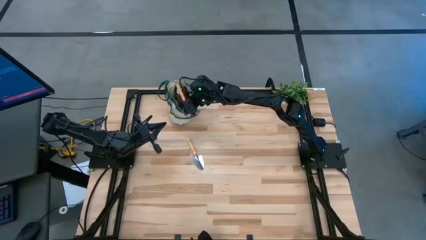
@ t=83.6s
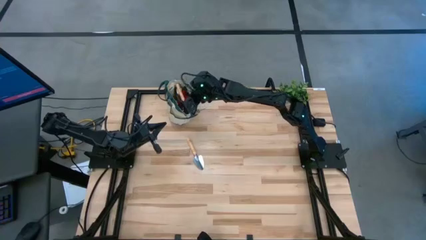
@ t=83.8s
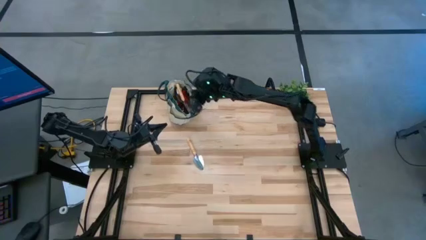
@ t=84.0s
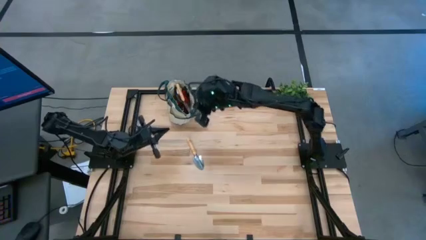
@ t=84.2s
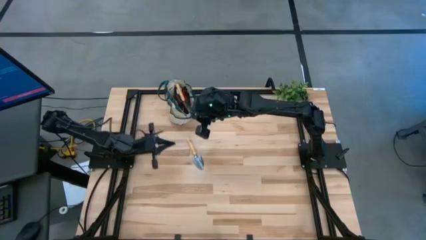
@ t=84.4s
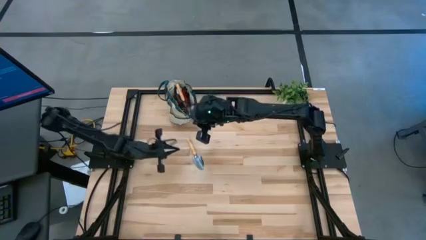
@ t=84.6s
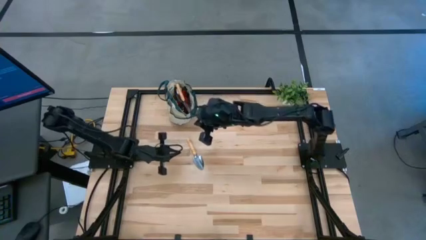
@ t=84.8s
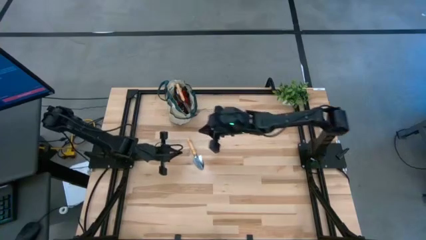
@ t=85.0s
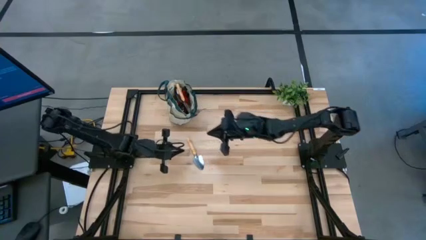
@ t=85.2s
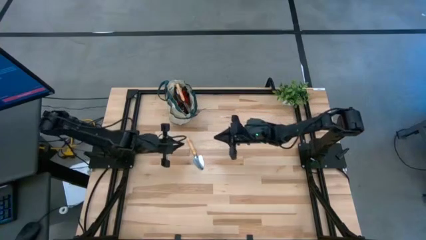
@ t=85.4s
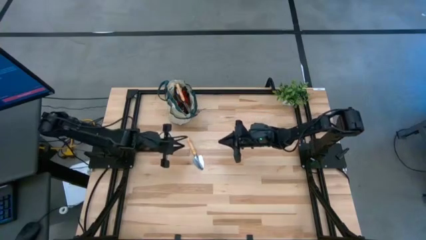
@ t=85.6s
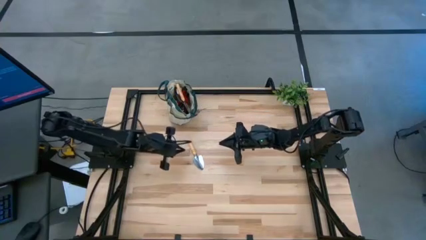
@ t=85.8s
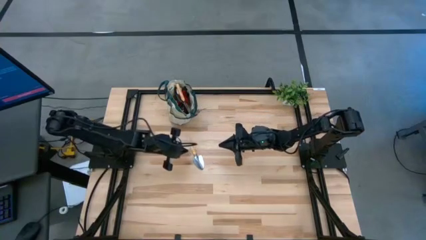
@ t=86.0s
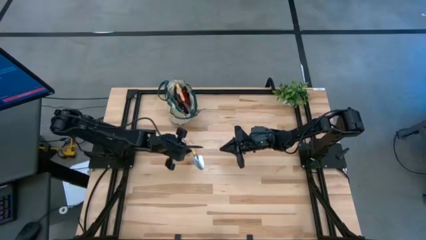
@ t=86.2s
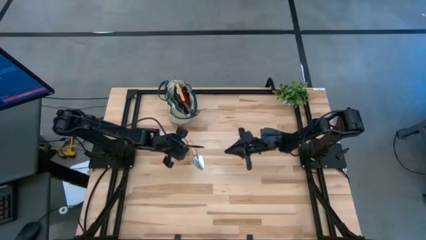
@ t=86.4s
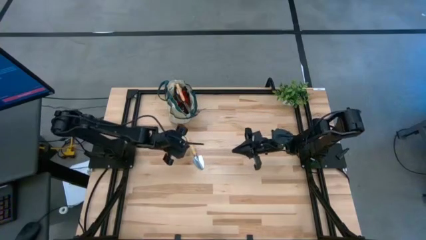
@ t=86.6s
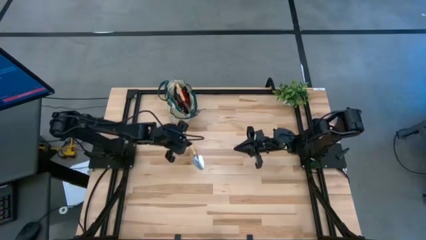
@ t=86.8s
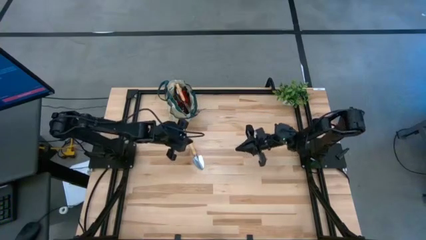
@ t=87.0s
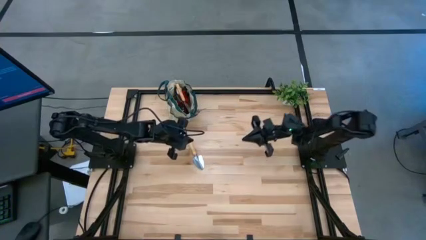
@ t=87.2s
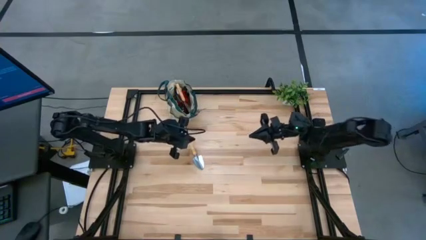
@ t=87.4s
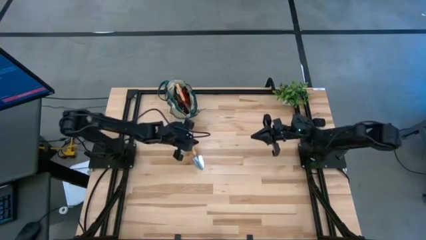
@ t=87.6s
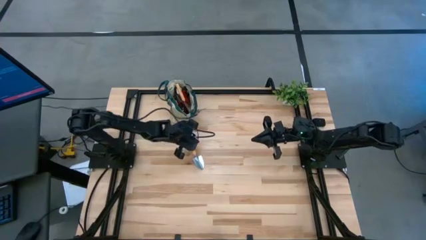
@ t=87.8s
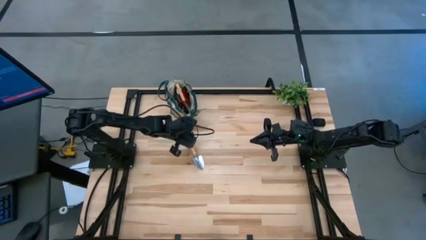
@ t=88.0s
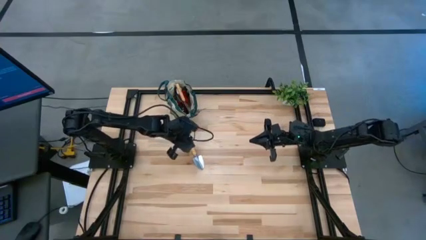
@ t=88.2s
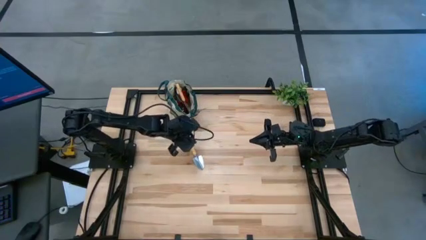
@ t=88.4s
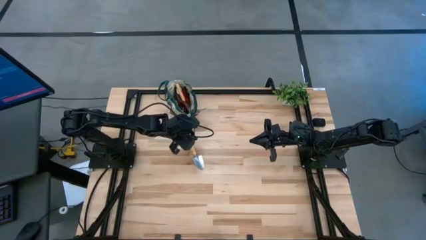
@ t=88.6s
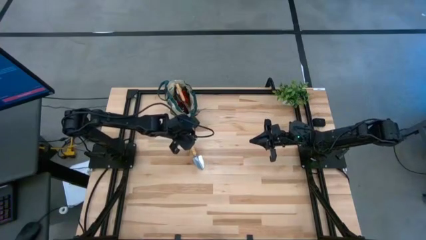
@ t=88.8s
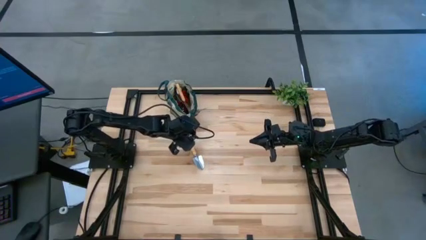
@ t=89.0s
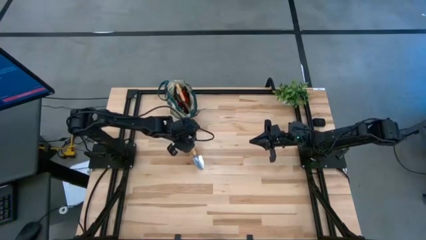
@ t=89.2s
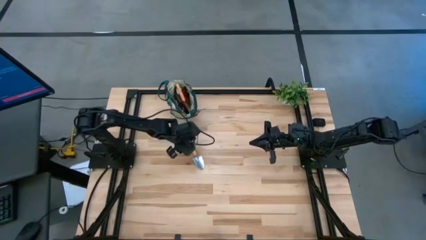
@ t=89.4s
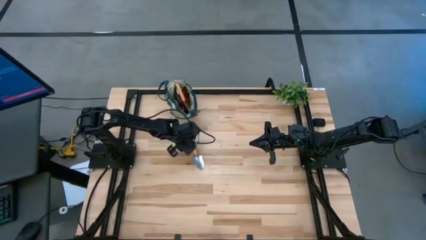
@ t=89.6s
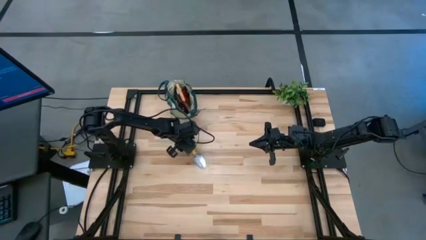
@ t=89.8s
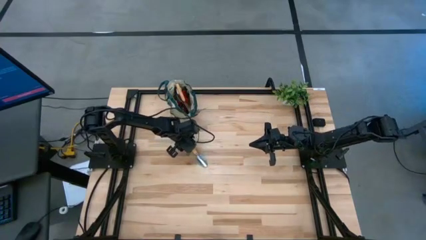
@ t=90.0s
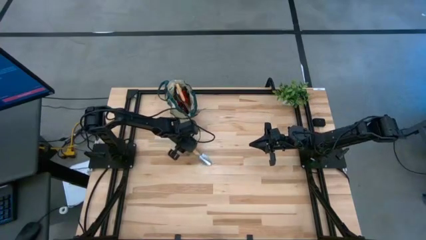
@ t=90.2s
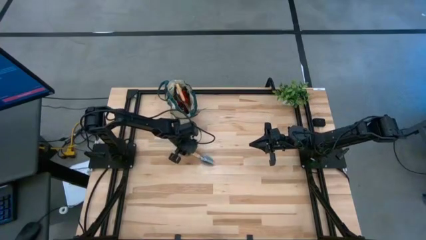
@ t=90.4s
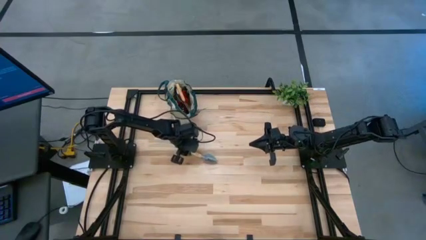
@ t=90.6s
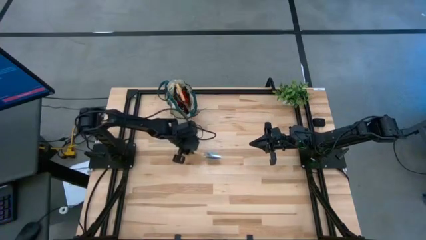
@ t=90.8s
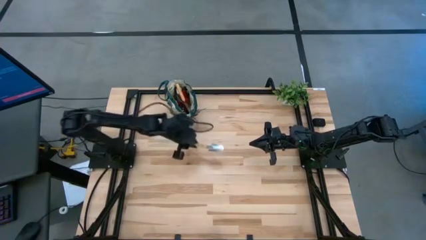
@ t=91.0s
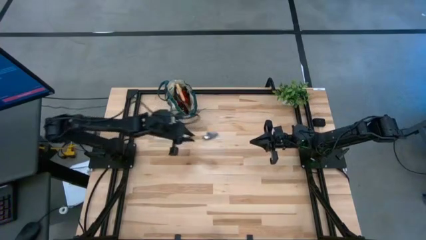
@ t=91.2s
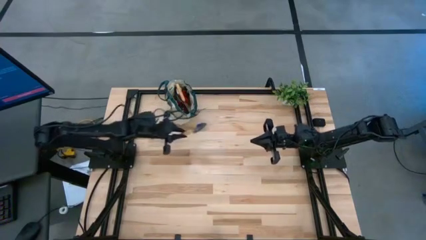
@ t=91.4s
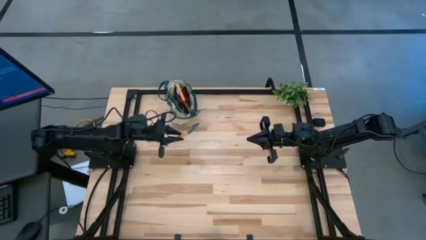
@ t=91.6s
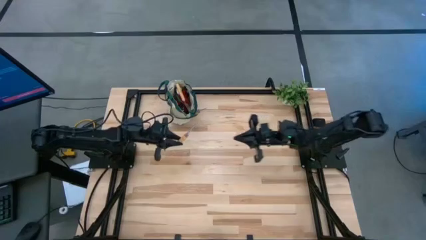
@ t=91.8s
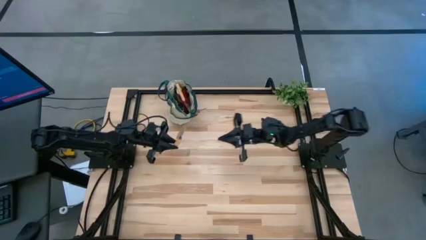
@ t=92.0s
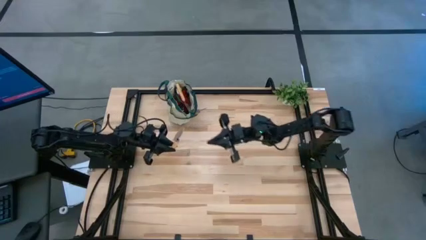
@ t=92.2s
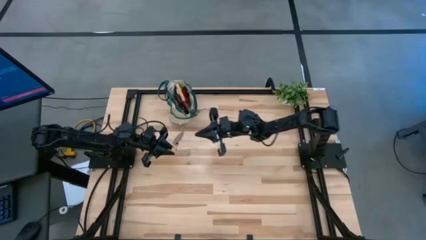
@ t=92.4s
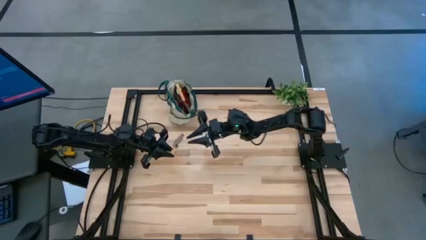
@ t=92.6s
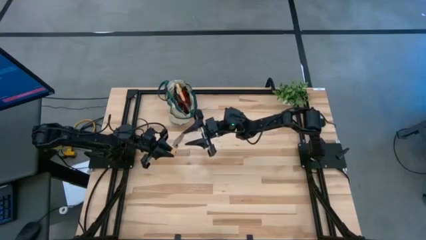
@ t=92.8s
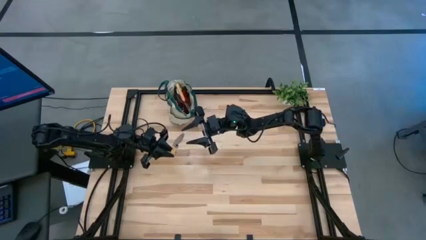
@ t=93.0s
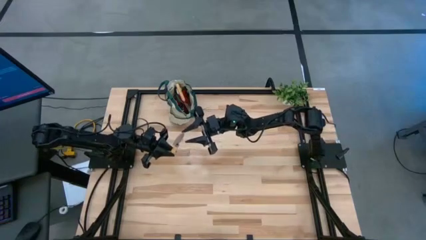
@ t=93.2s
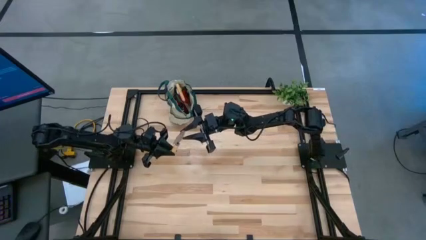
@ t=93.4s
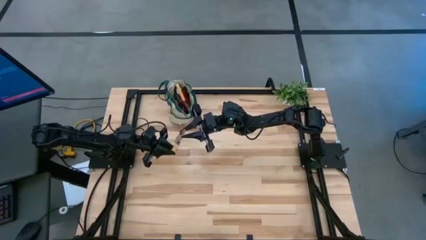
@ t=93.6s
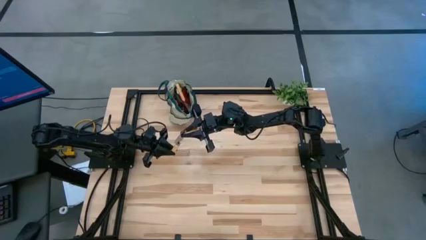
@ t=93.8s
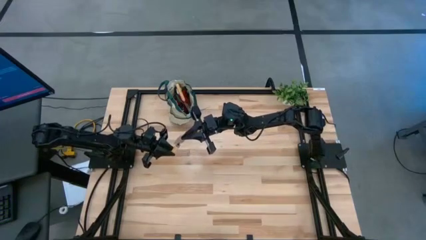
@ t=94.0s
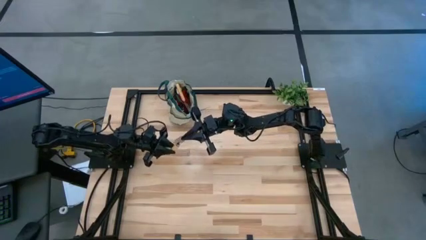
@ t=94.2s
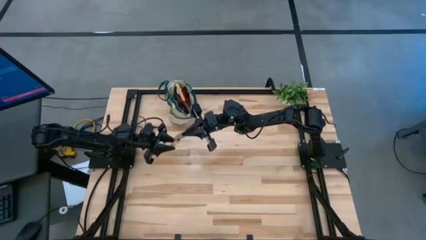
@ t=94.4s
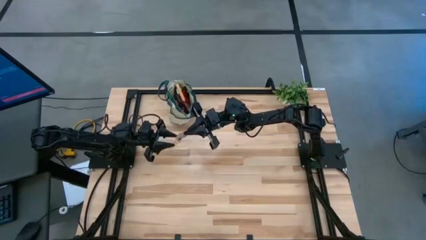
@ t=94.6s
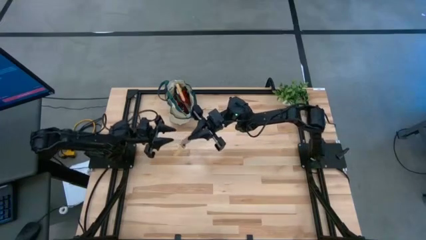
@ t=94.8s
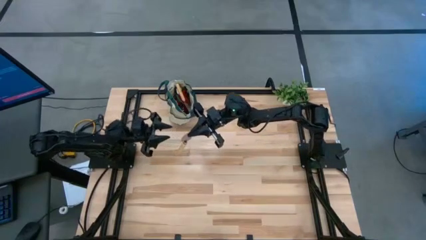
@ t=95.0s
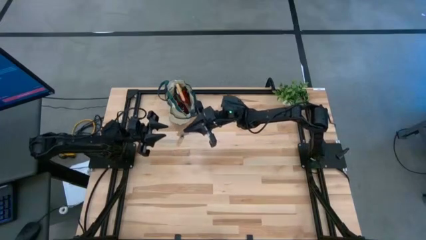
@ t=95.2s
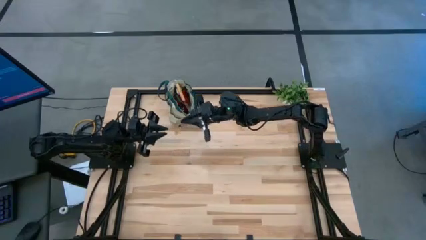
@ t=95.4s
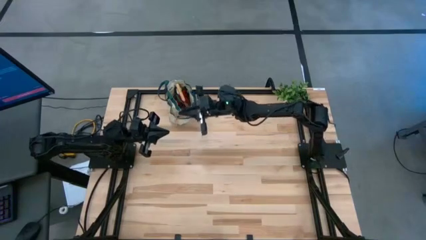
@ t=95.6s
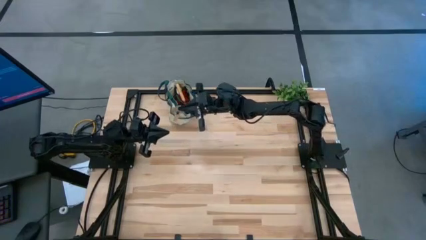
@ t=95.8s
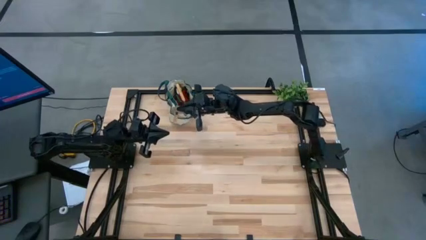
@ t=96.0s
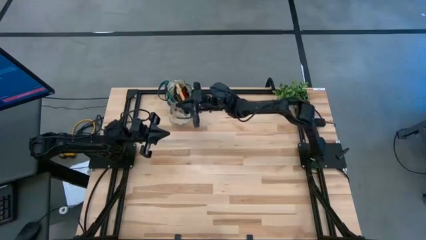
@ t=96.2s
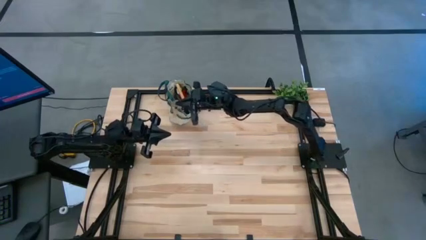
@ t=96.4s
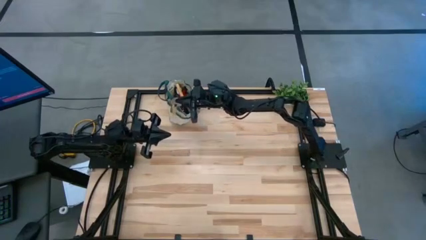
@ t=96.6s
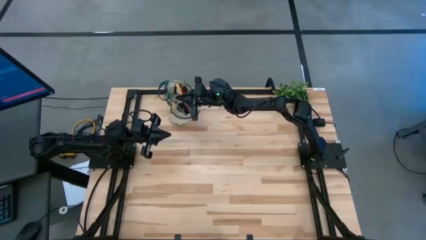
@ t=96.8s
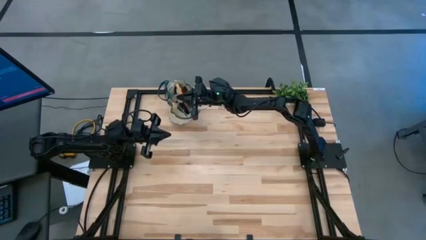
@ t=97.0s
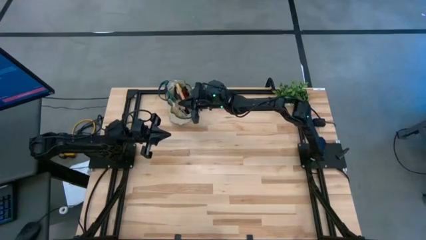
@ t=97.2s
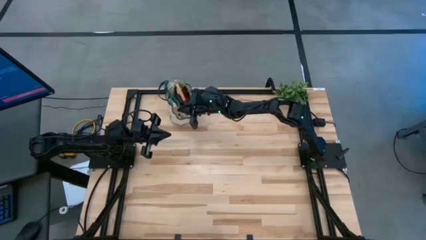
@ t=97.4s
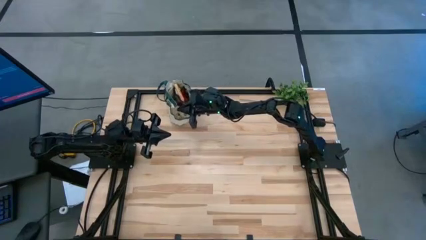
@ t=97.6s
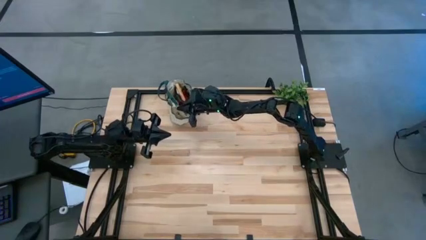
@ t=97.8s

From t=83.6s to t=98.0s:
Task: Pick & Place Garden tools in Gardening bag
Put the brown trowel into the yellow gardening bag
